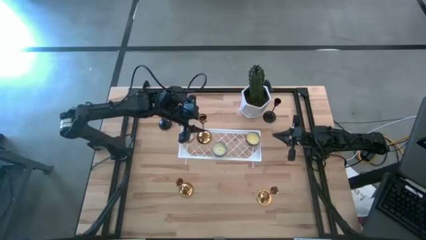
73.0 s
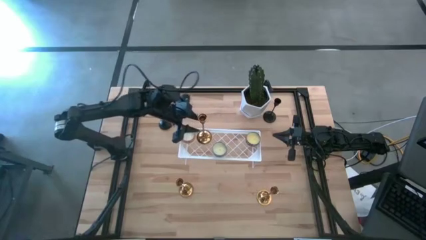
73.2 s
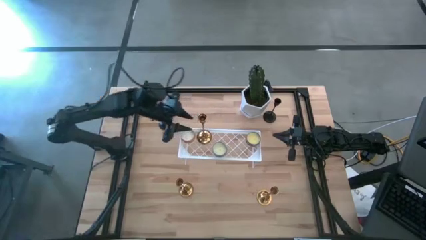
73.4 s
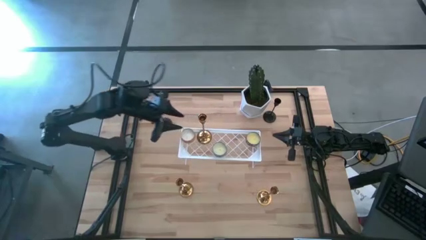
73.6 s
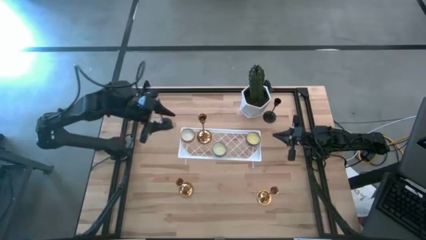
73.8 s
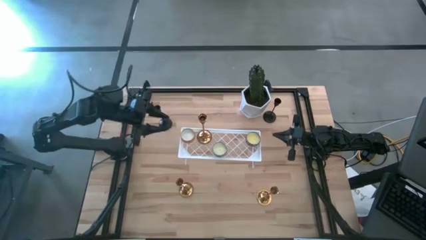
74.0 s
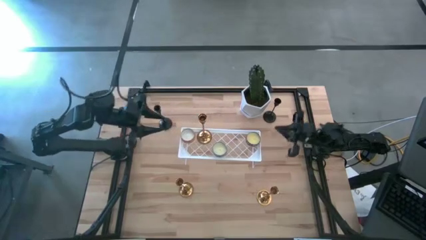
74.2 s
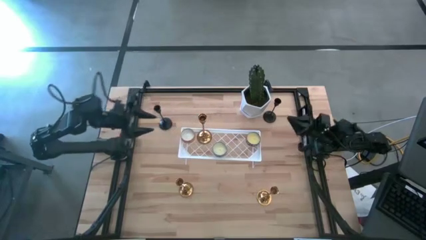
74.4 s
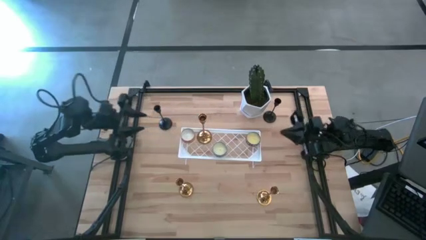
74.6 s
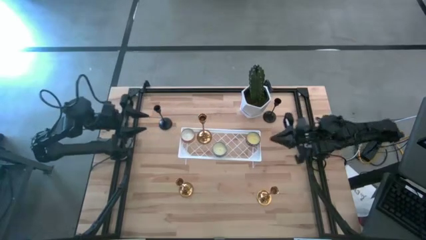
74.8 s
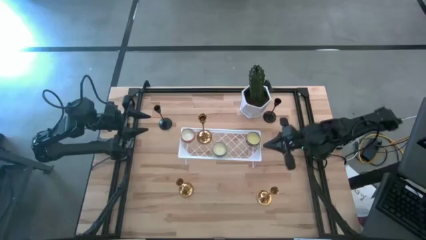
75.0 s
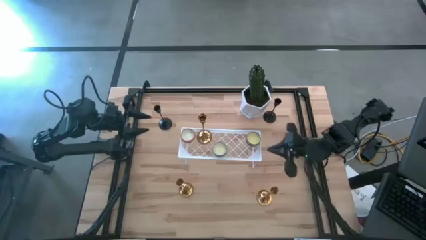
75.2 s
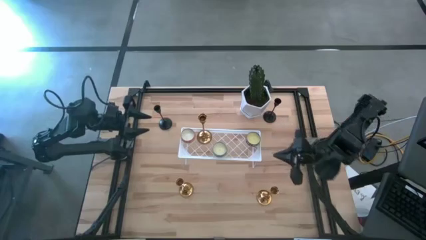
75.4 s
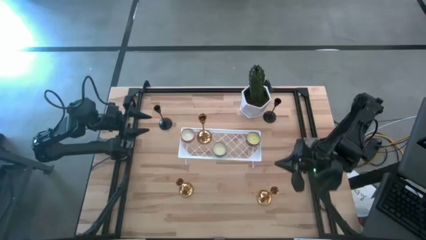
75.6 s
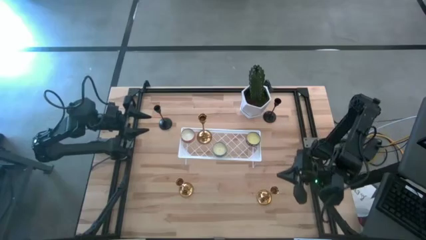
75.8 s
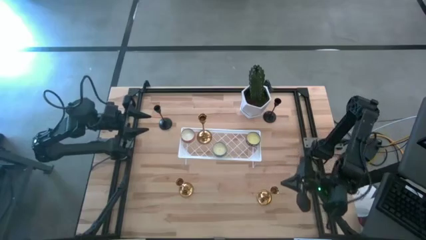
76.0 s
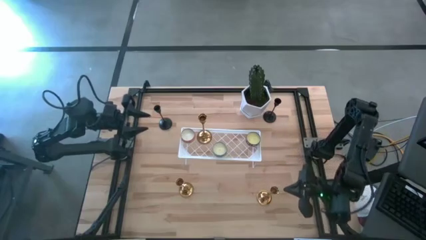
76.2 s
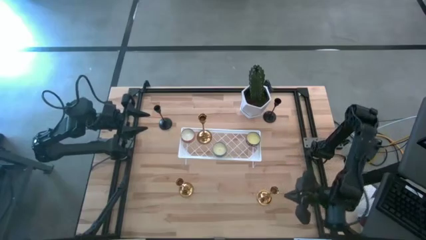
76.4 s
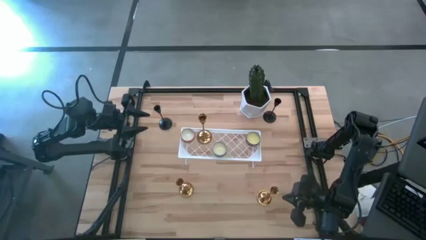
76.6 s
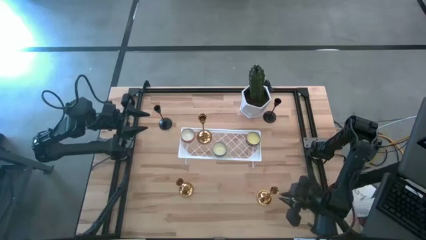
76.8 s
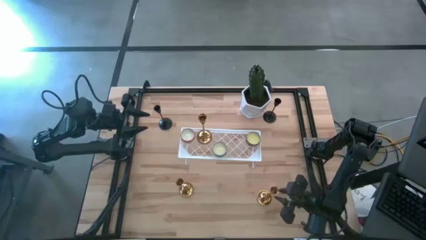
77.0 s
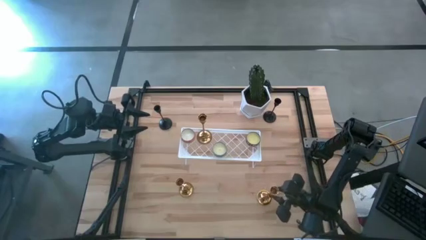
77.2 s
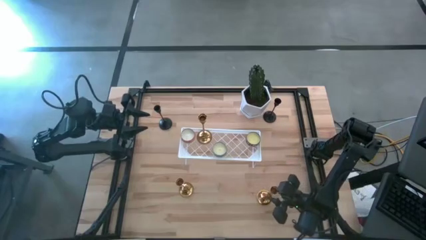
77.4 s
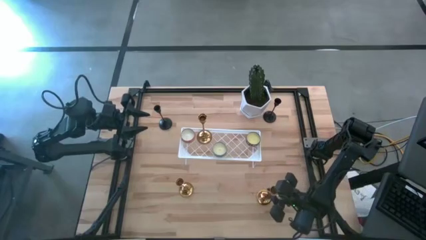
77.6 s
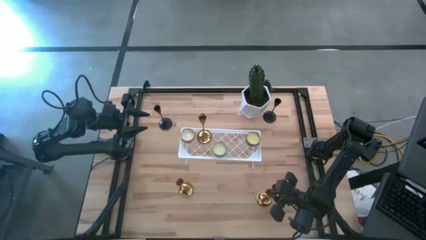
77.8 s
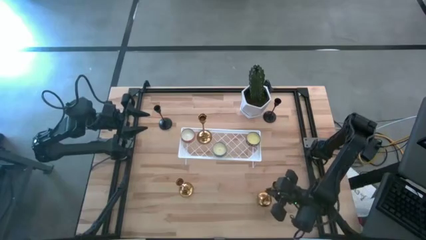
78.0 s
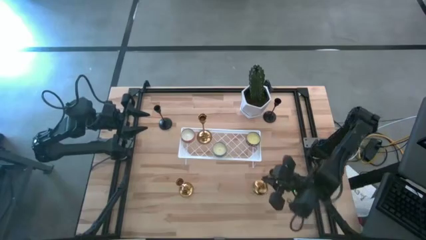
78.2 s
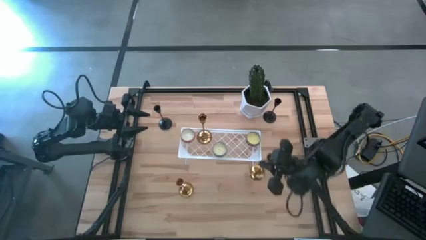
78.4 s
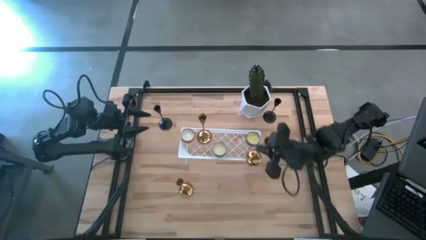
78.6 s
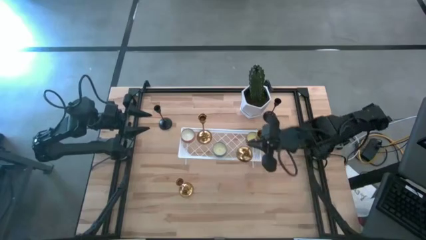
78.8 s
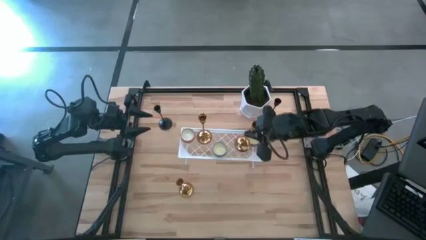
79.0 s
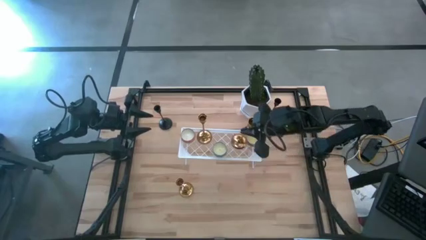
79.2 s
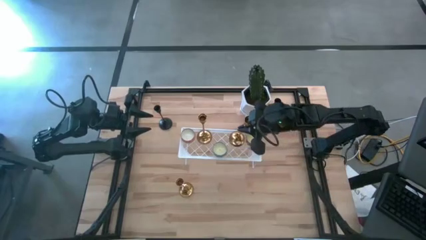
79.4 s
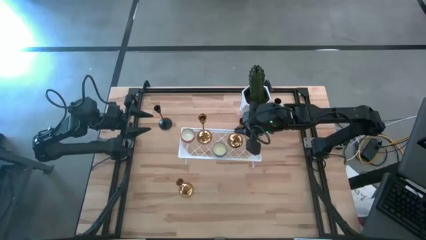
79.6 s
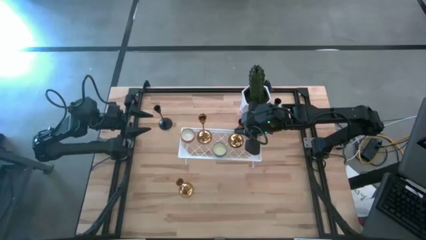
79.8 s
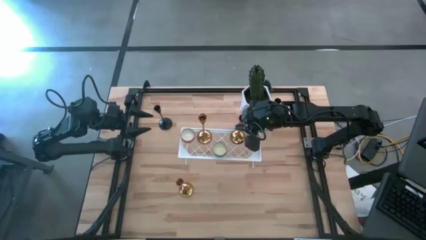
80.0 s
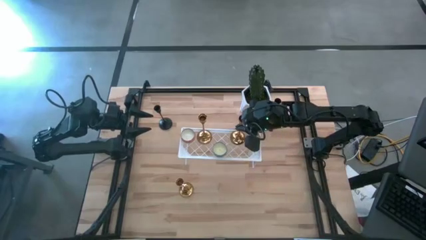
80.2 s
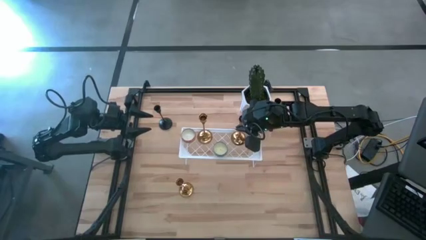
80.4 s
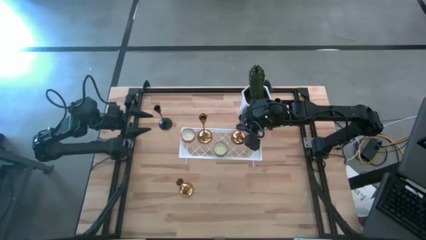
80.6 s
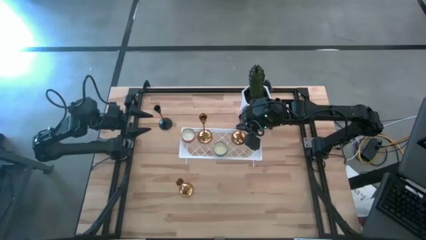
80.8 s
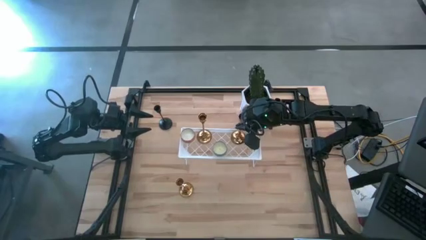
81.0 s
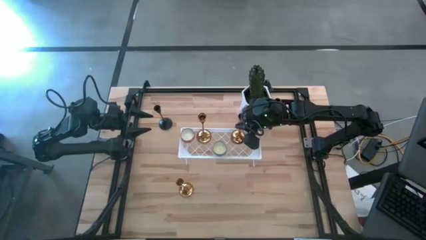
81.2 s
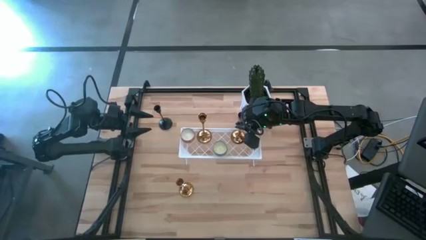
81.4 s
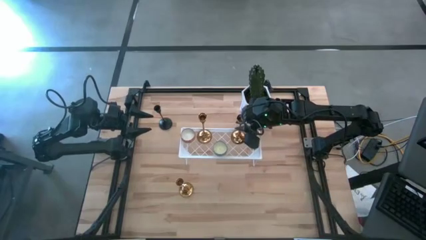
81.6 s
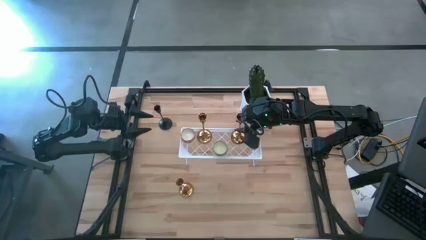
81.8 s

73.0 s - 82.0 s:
Task: Pick & Place candle stick holders
Put the right gold candle holder on the shelf

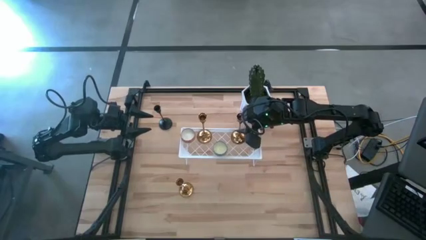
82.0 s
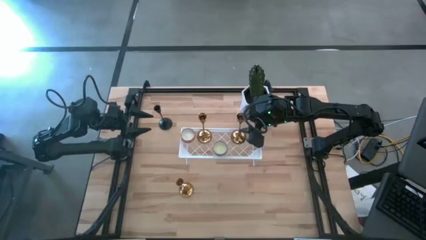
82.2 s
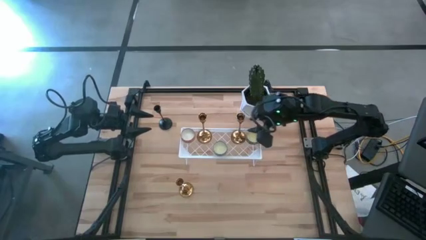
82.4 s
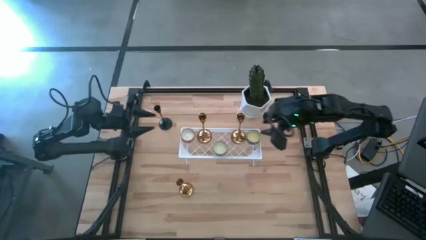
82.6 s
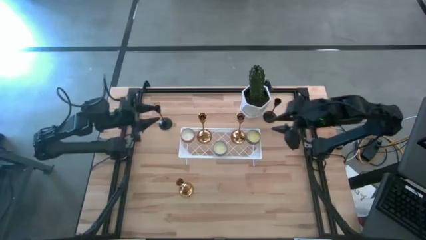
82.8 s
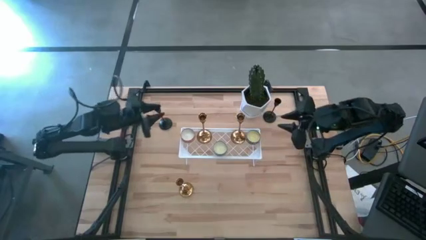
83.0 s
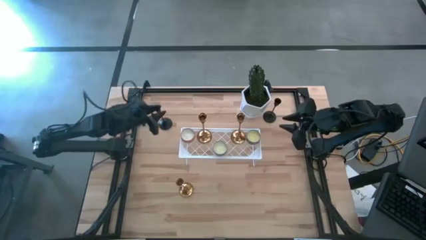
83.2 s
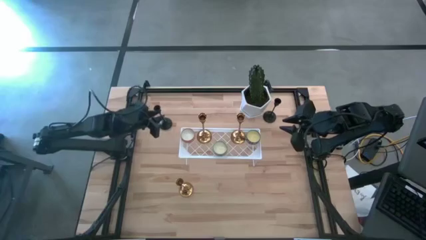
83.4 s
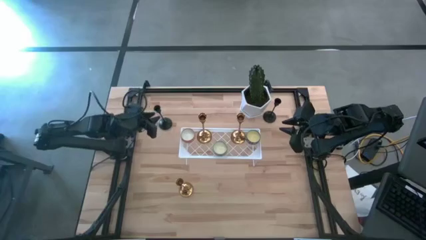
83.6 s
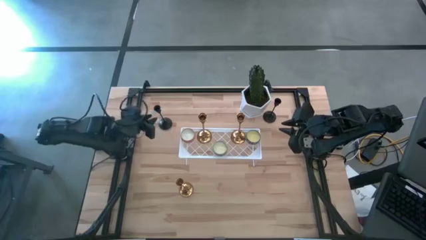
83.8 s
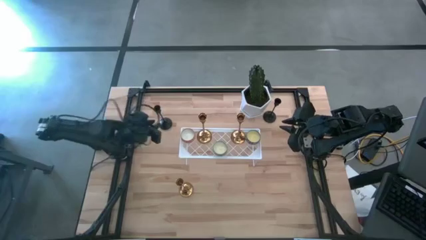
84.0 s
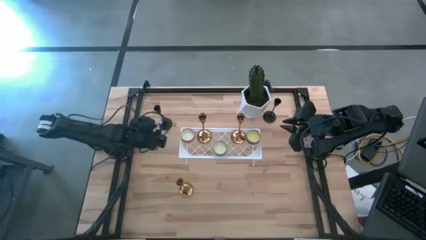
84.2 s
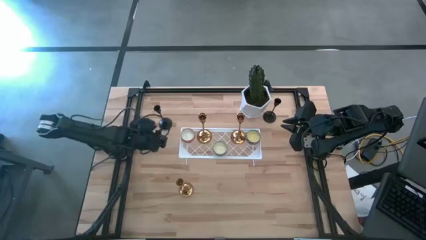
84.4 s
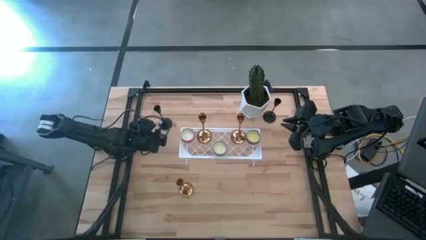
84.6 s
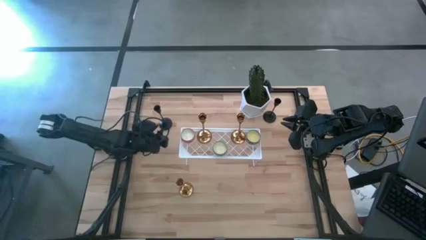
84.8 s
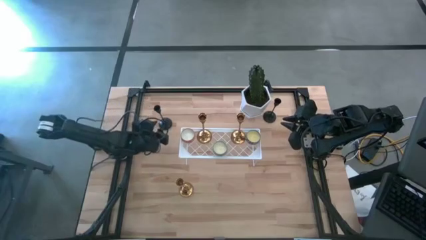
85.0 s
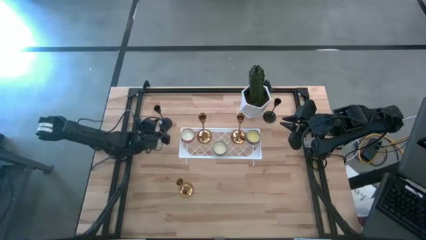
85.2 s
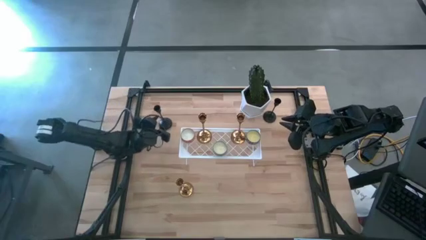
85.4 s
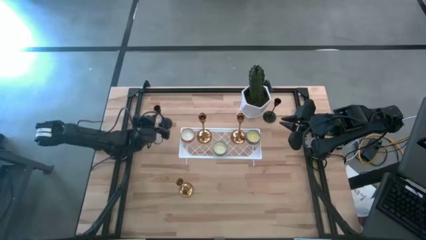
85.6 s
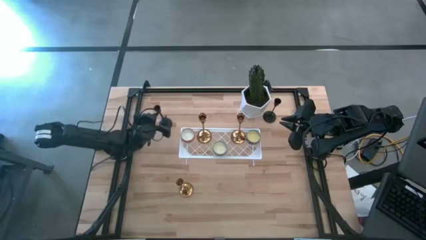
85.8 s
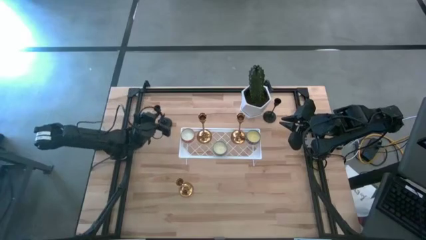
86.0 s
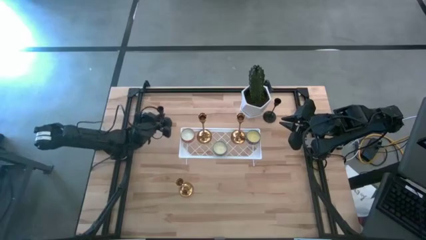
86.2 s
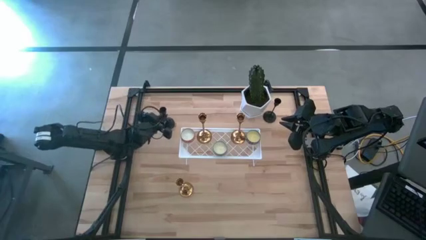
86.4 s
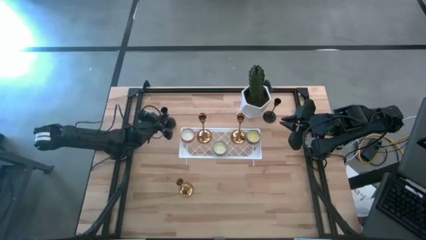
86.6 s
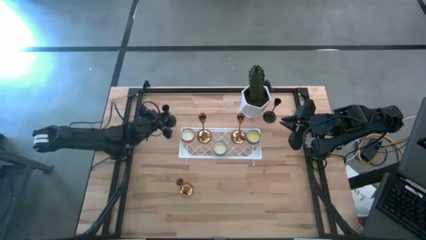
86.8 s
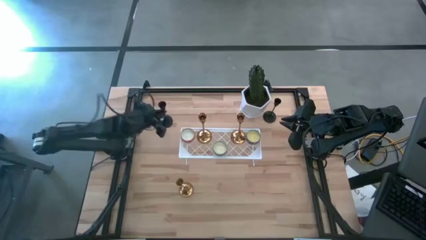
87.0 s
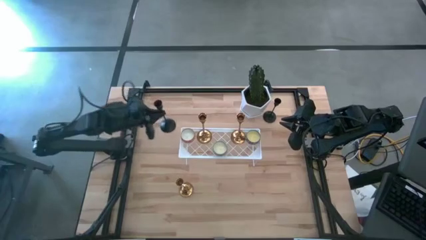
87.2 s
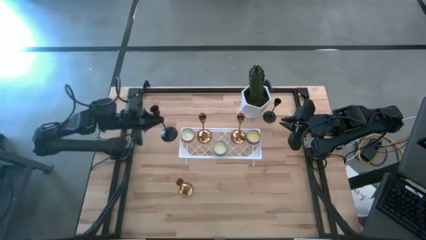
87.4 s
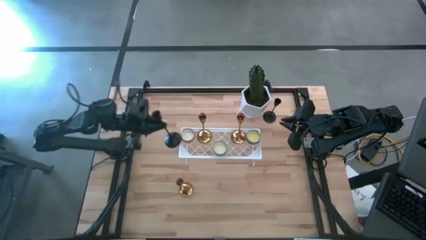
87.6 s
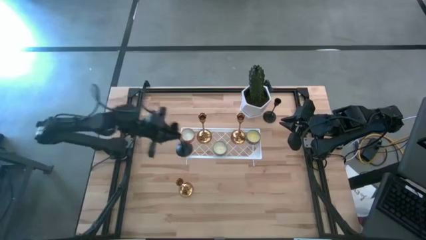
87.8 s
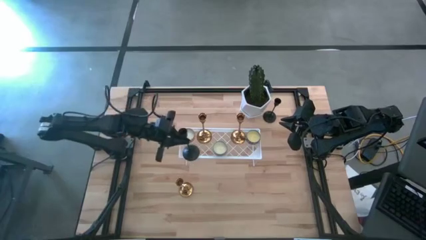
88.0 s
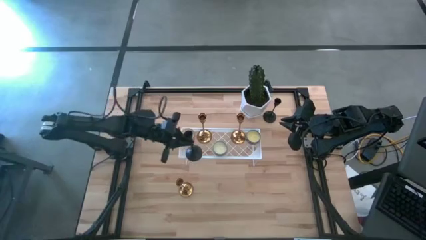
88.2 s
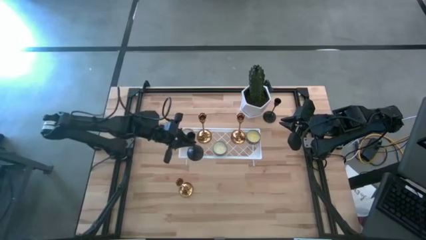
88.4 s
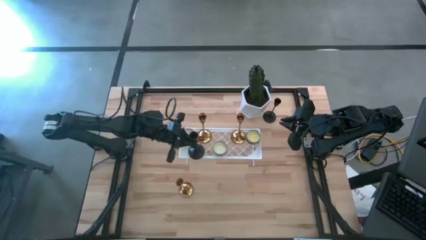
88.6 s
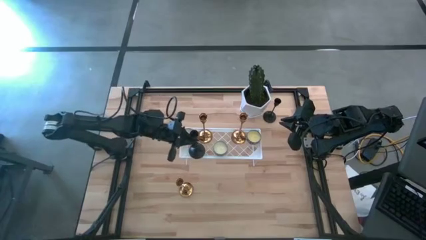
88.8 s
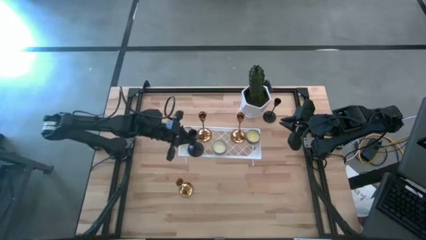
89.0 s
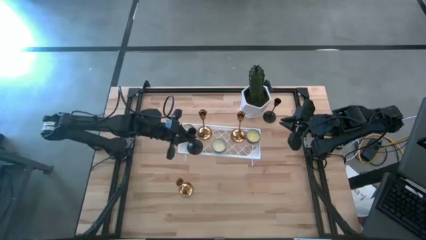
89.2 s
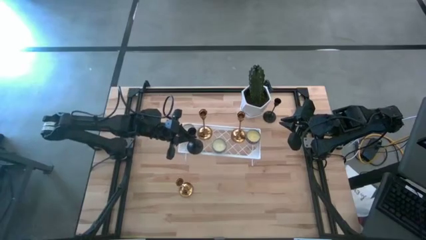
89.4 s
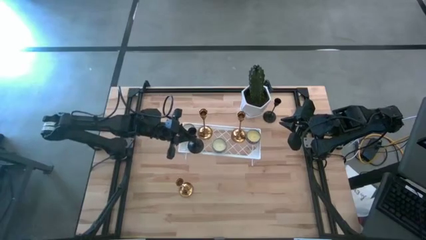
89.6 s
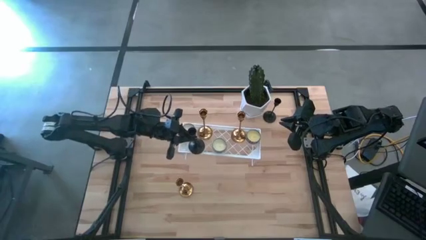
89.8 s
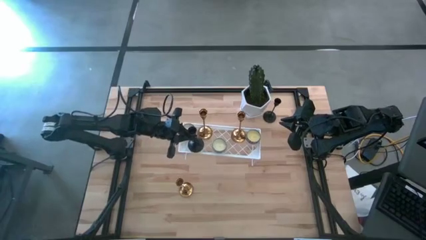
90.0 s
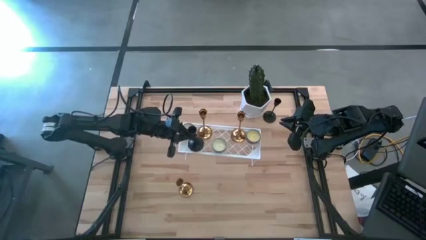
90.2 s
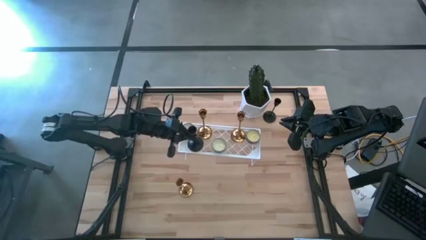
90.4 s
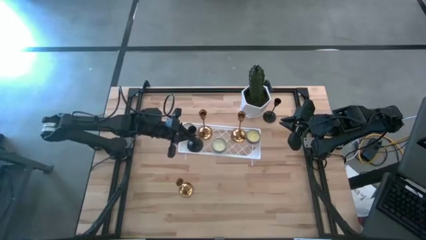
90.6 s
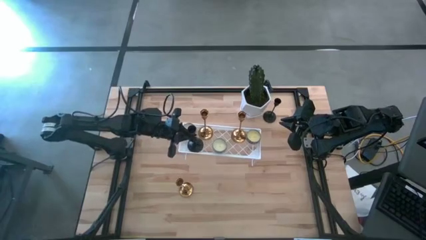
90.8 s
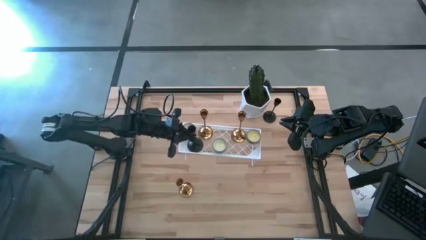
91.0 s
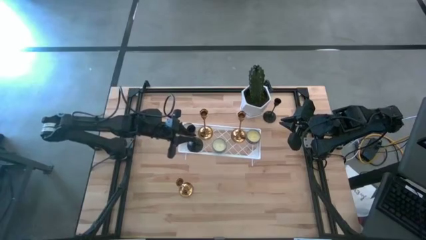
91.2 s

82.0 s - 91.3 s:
Put the left black candle holder on the shelf
